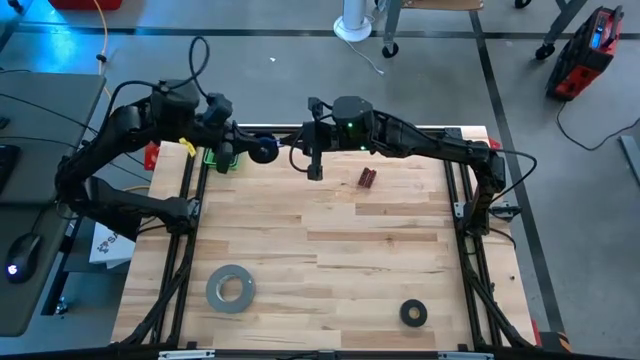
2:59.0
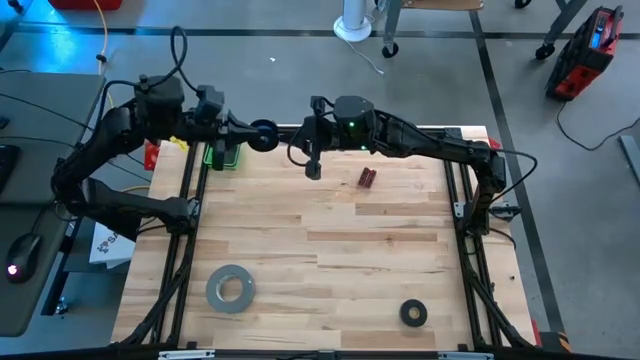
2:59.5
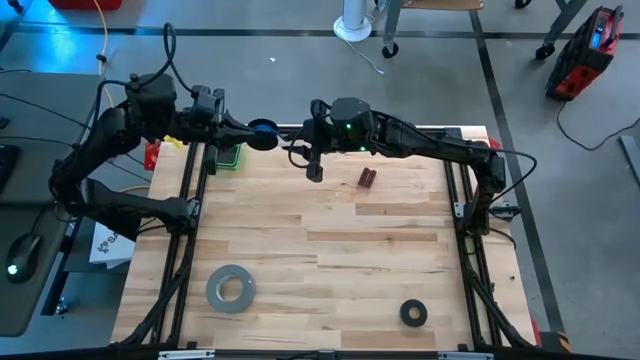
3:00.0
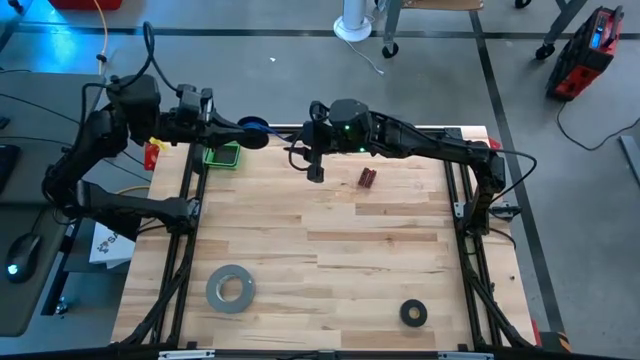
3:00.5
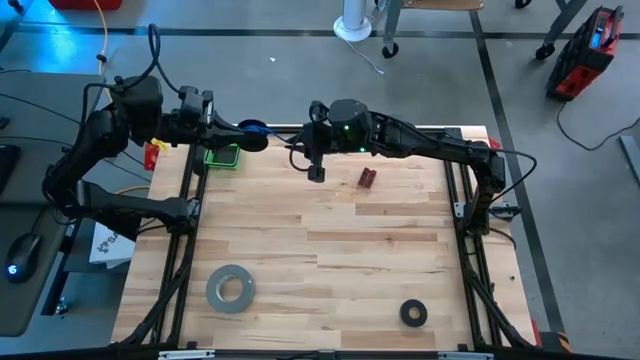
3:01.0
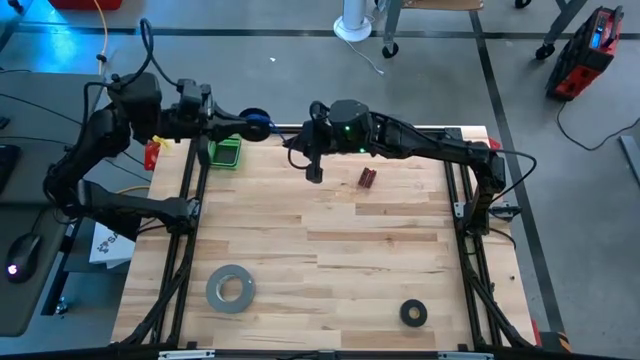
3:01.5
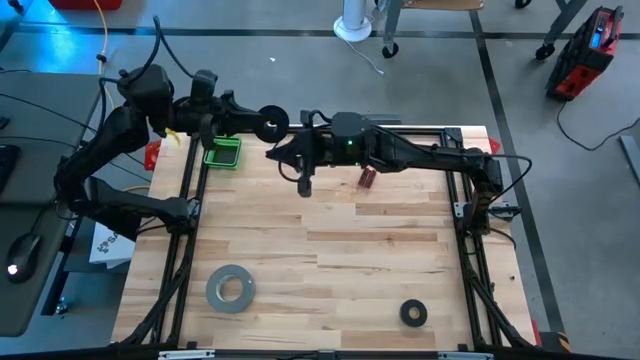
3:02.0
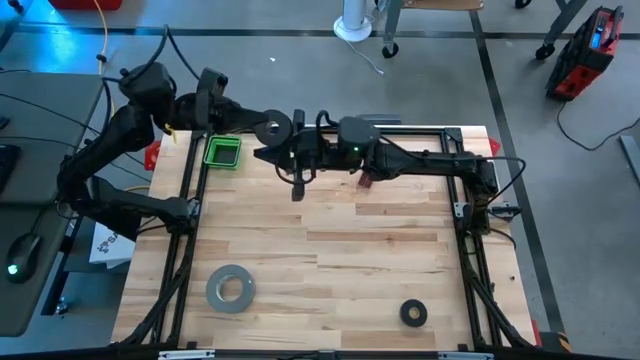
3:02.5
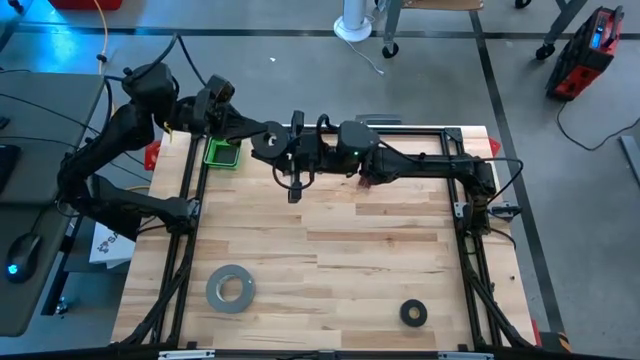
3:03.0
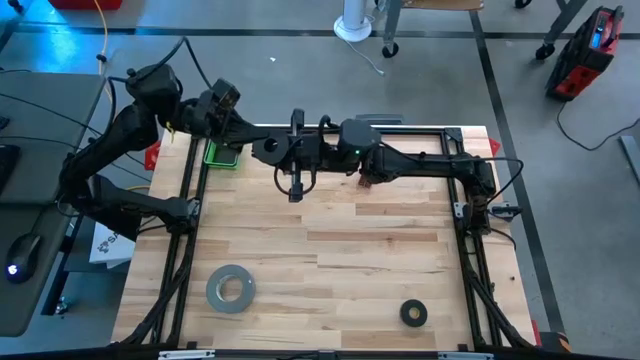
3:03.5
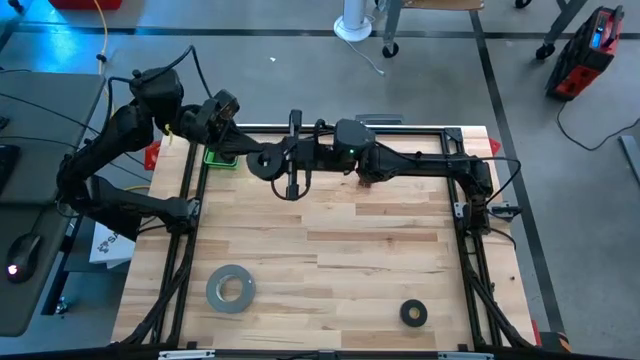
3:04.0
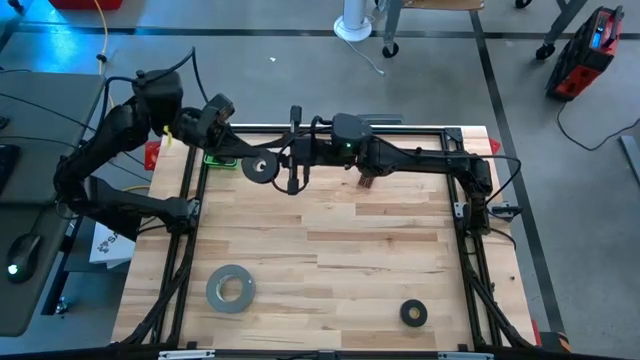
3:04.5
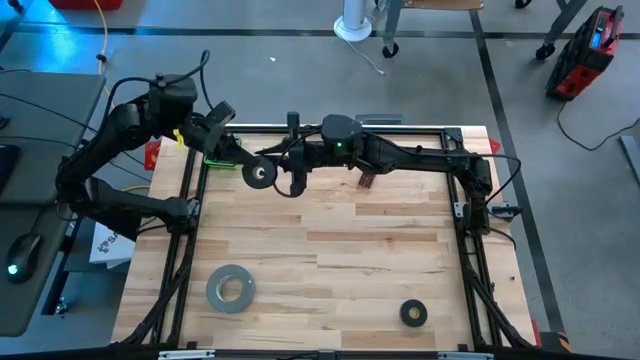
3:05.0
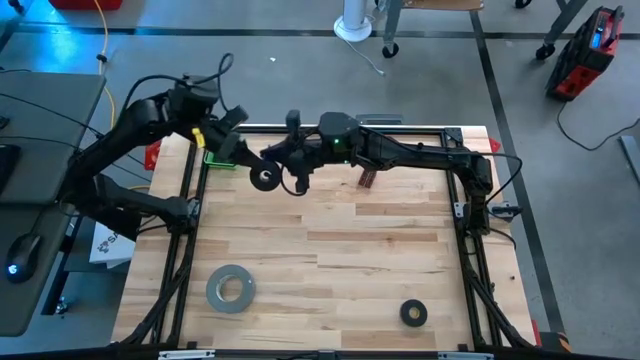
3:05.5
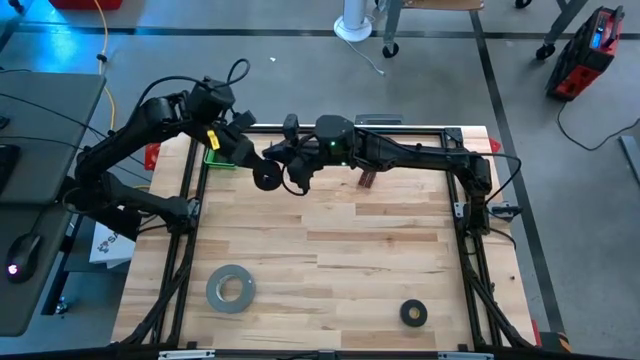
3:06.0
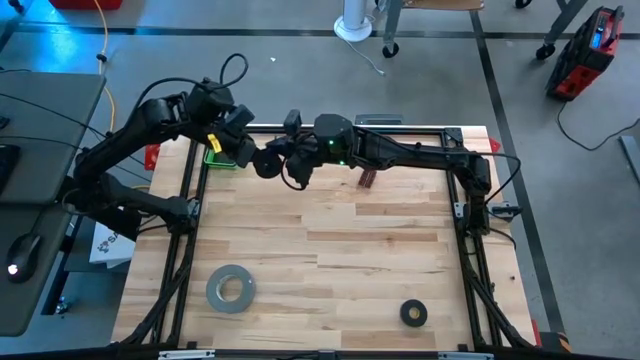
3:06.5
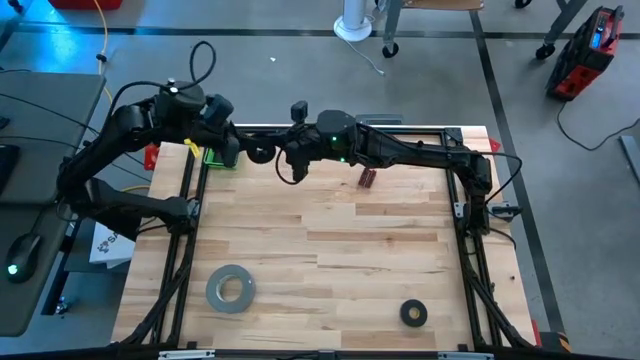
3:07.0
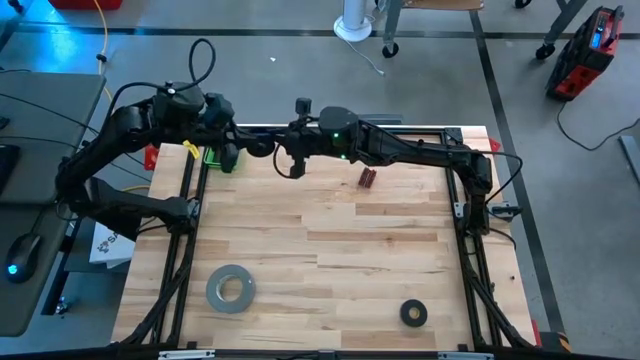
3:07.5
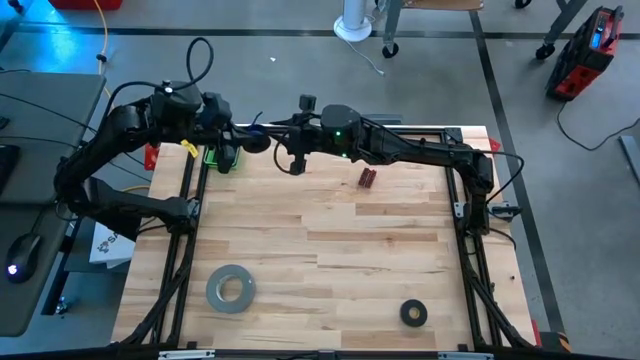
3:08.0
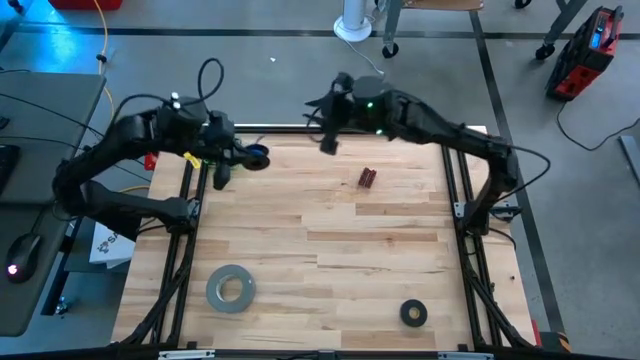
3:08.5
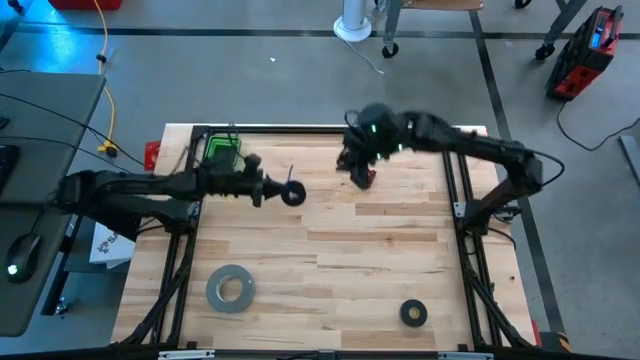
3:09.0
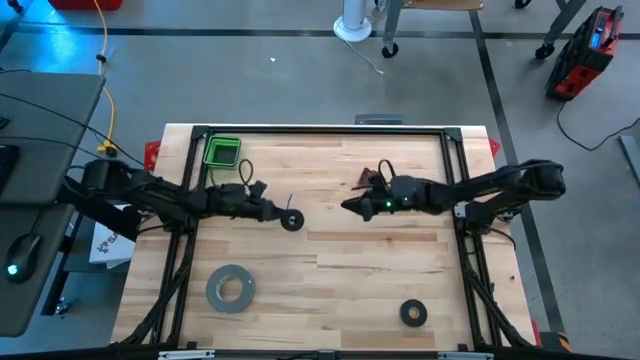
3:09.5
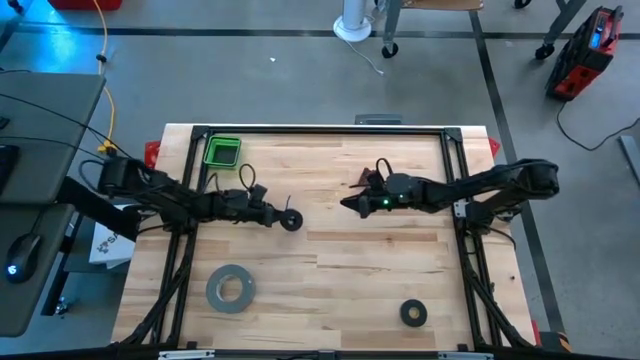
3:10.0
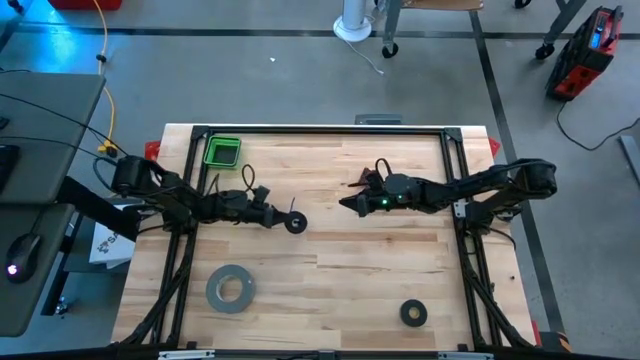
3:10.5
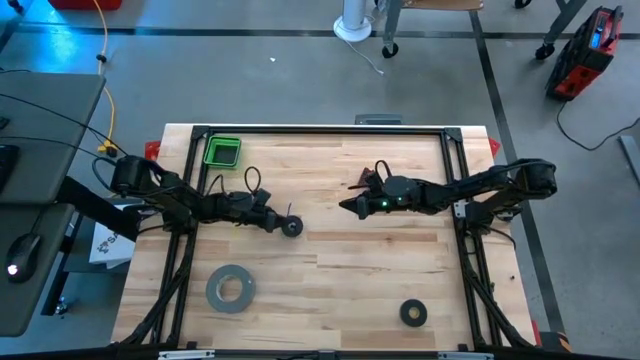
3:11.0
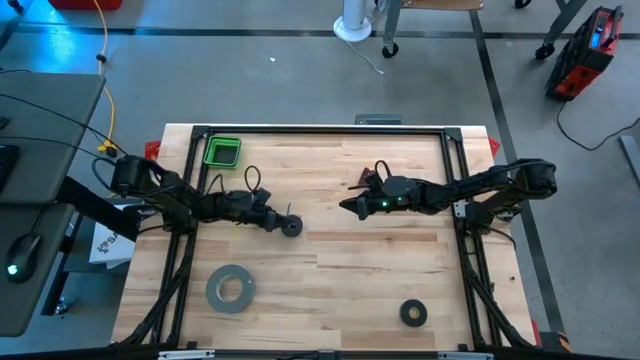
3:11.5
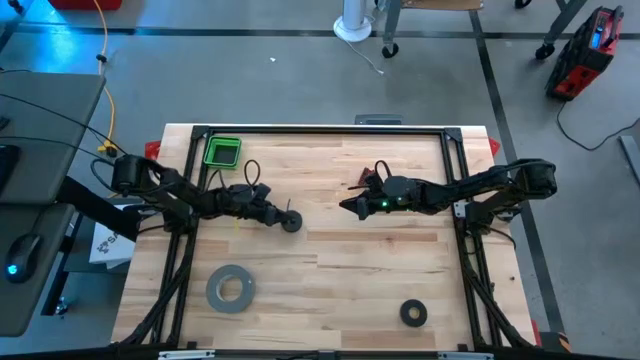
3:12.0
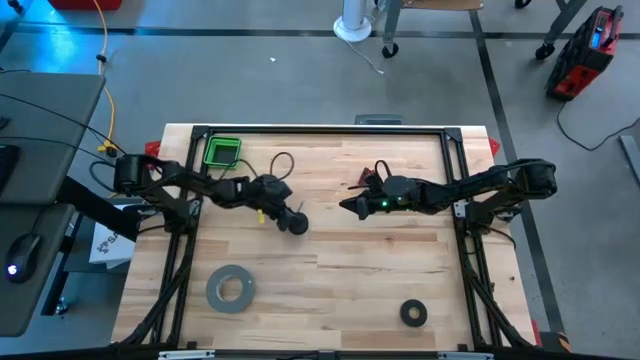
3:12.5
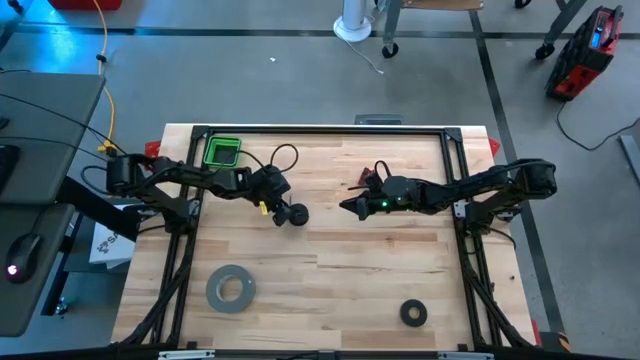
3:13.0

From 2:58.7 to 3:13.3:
Task: Coil cords
Coil the blue wire onto the spool

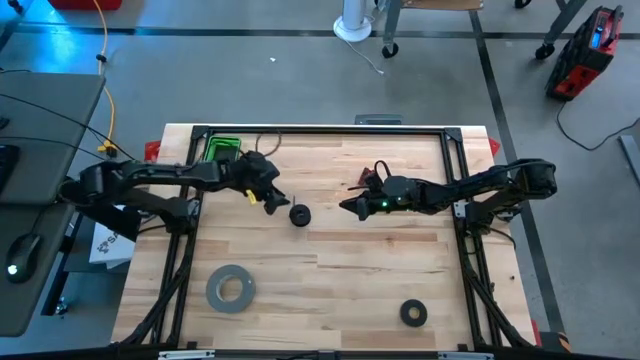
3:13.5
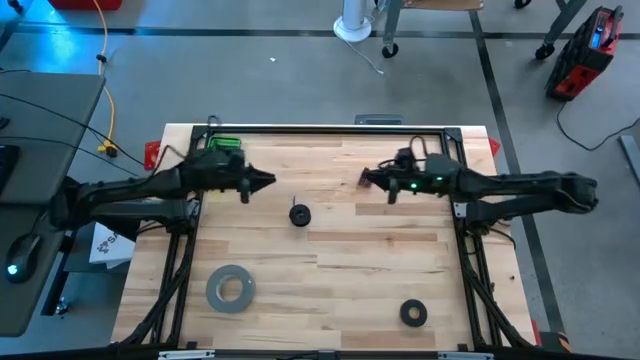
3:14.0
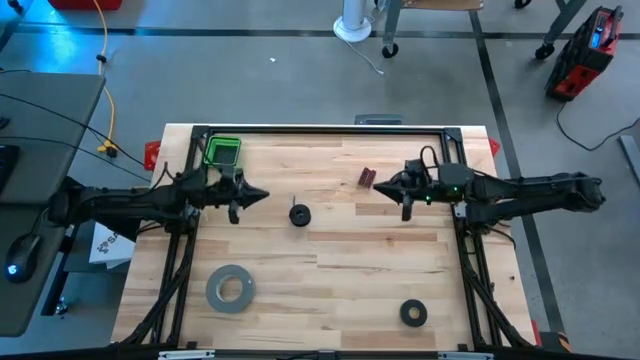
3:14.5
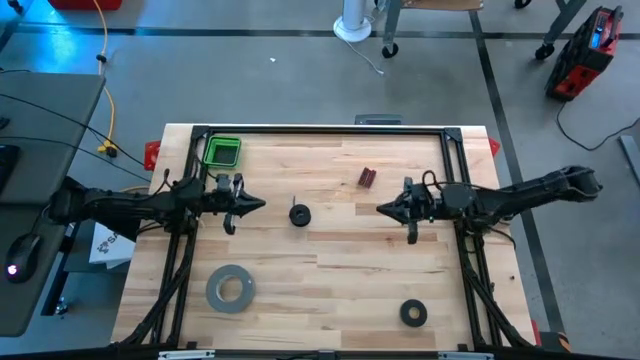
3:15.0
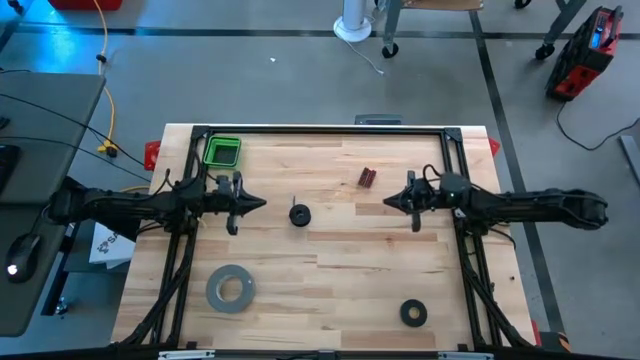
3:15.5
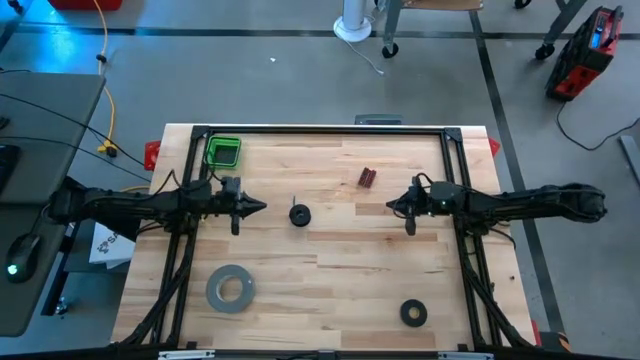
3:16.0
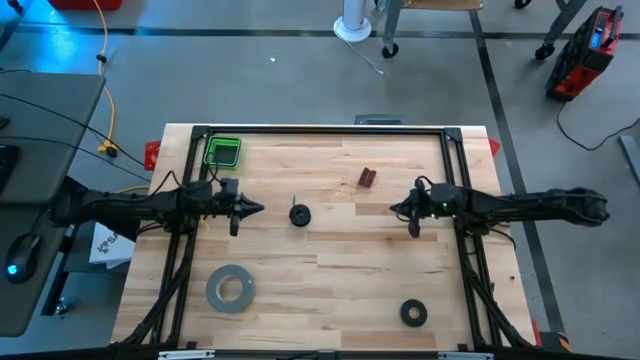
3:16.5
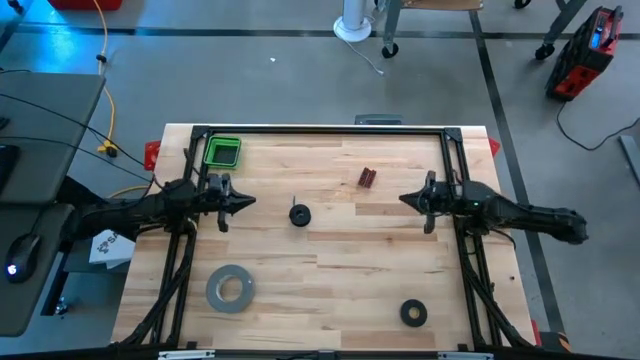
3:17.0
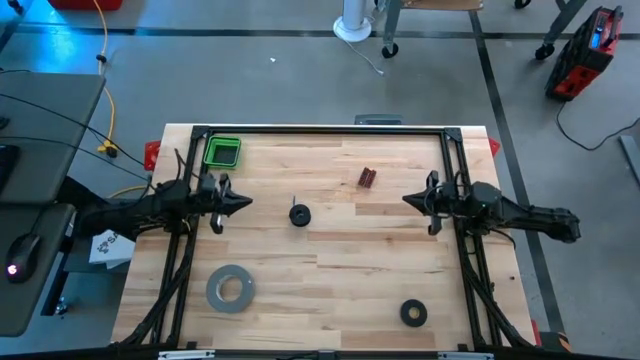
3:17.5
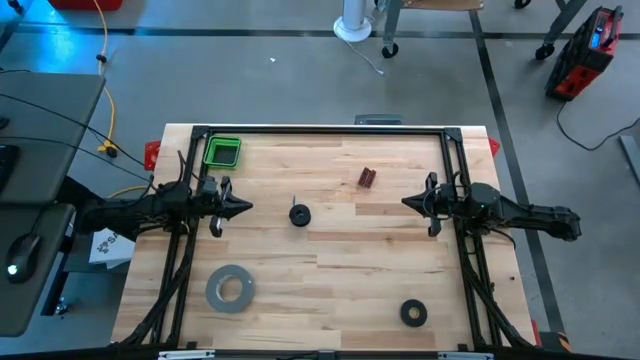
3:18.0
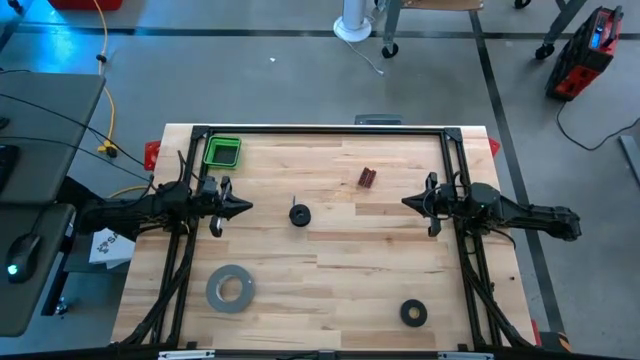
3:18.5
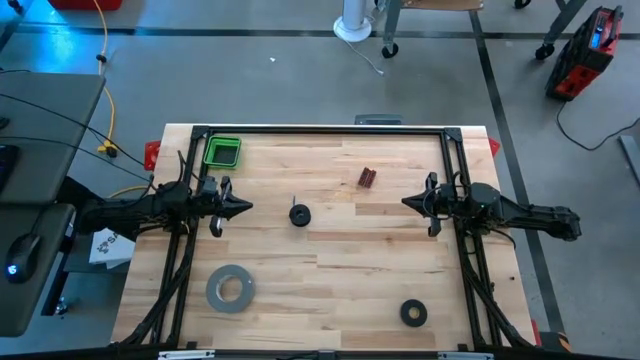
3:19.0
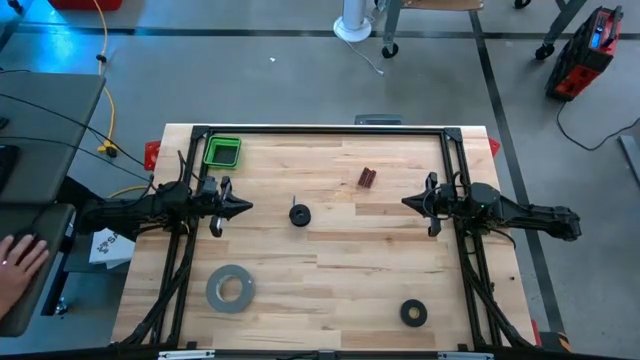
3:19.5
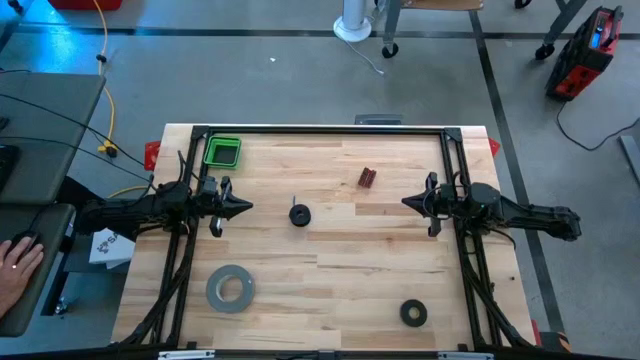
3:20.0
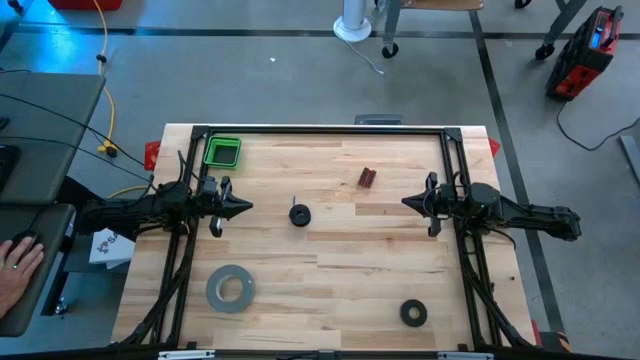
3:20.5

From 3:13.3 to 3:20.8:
Return to Home Position
